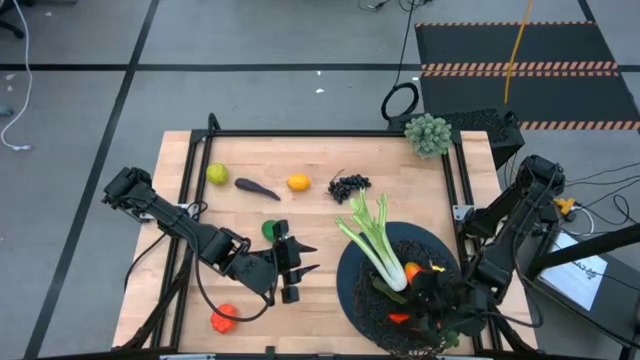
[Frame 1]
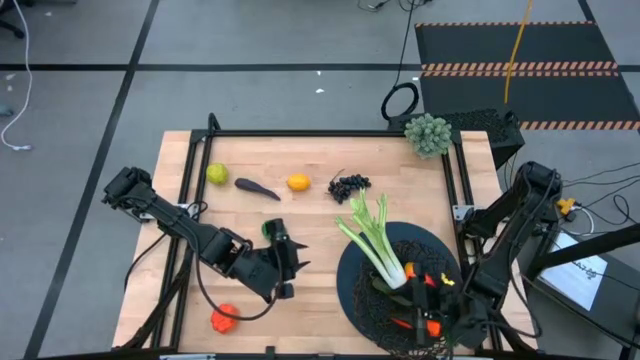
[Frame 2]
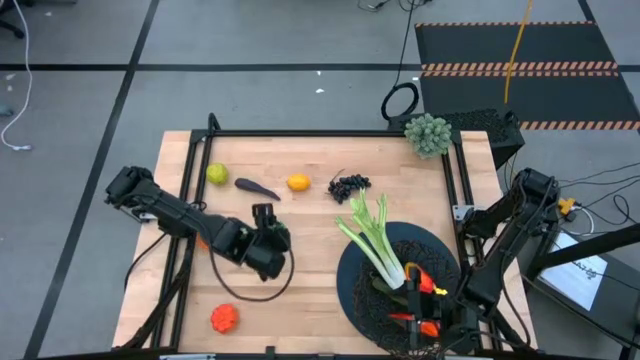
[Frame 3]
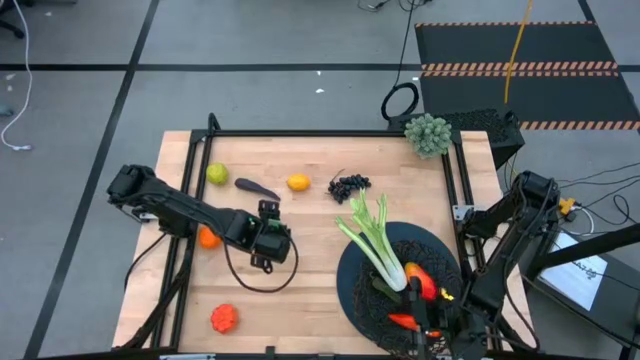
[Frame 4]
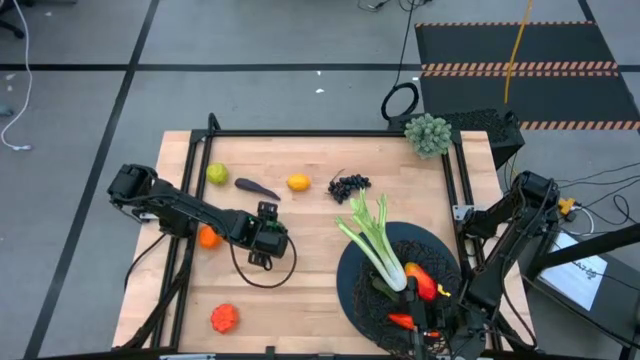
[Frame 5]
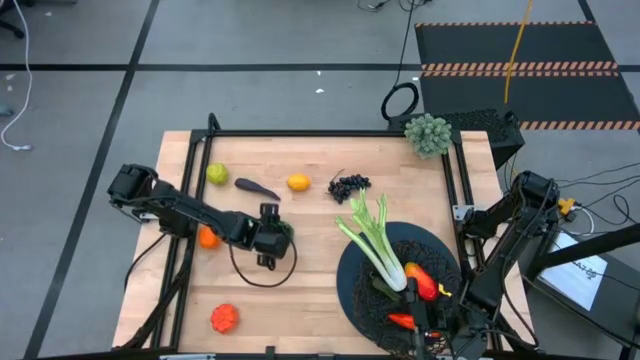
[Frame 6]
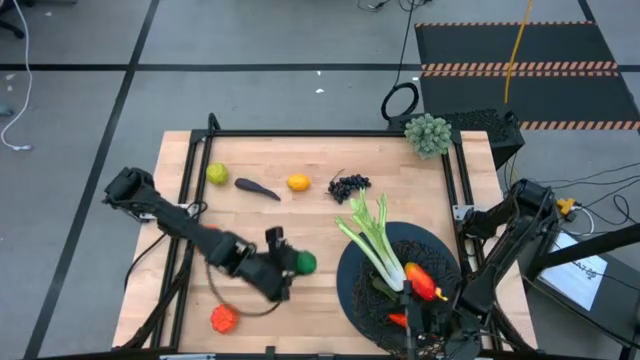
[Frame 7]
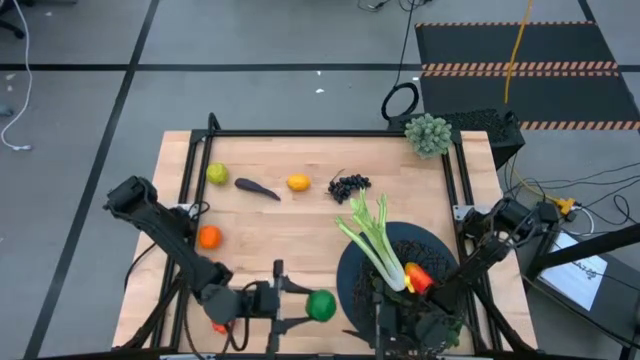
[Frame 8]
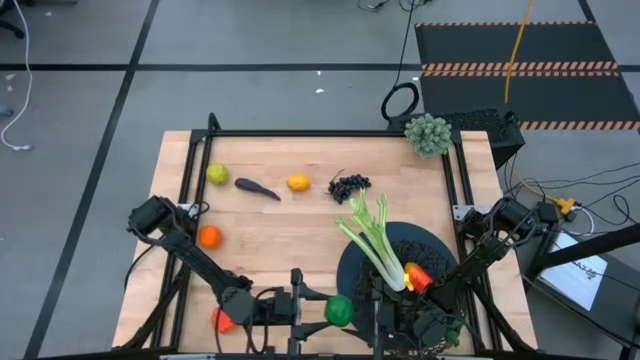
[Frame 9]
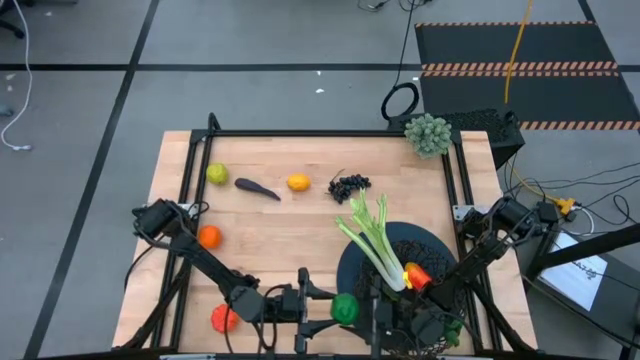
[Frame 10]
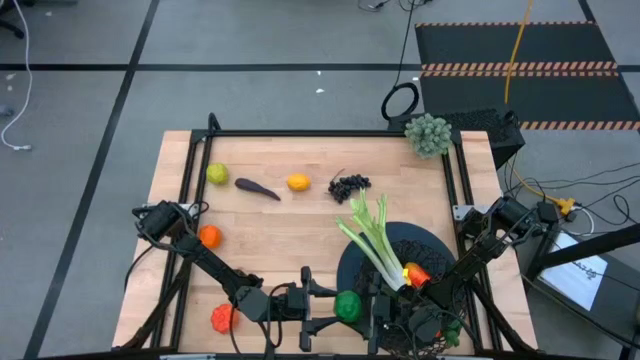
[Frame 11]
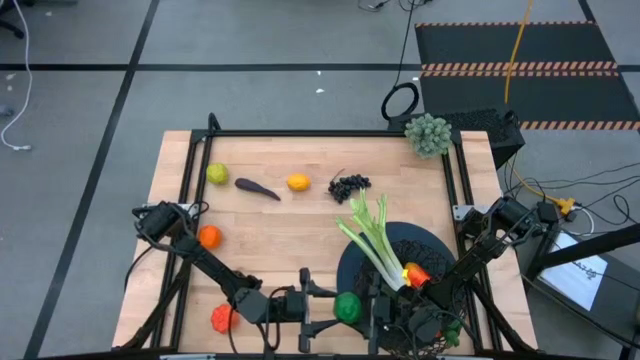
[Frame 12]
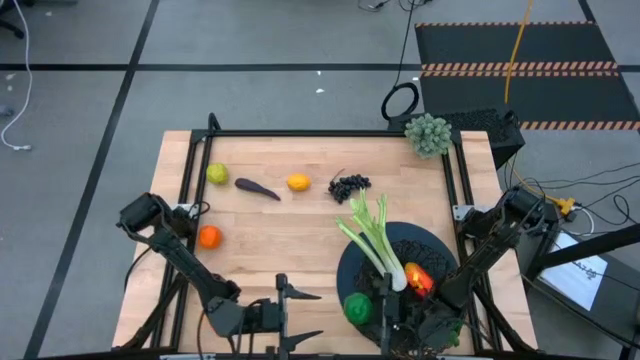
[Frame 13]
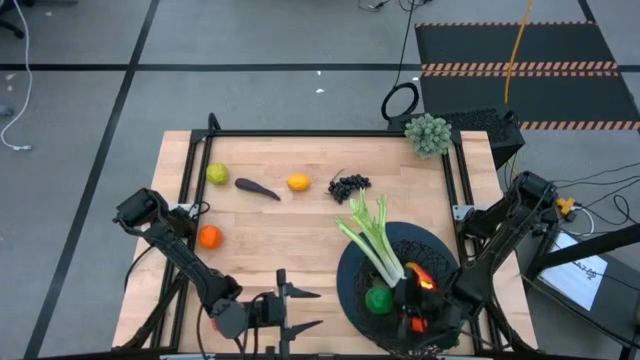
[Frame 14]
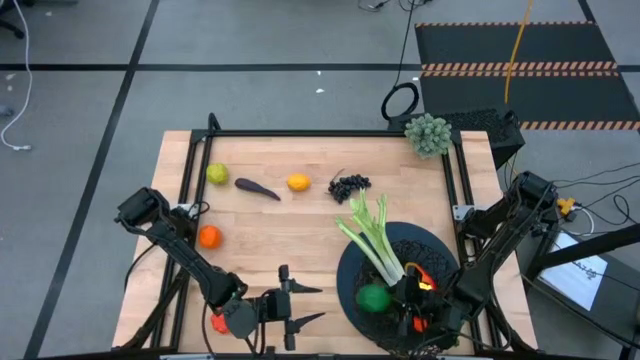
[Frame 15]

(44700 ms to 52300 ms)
Task: Build produce basket
Put the lime into the wire basket

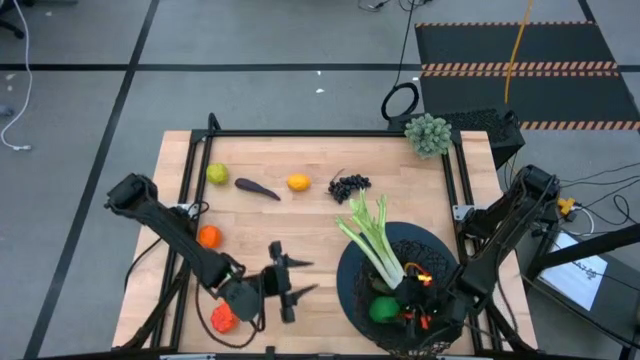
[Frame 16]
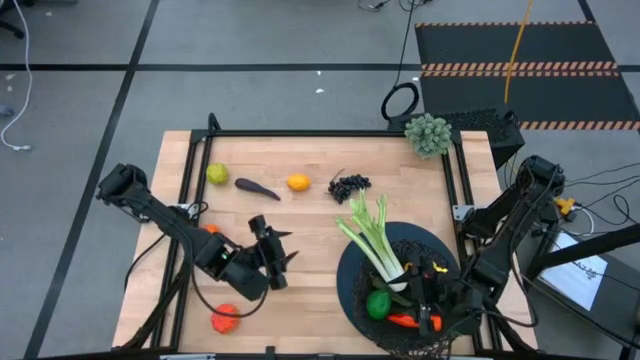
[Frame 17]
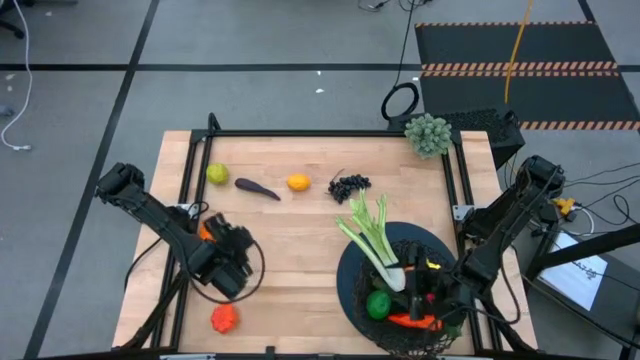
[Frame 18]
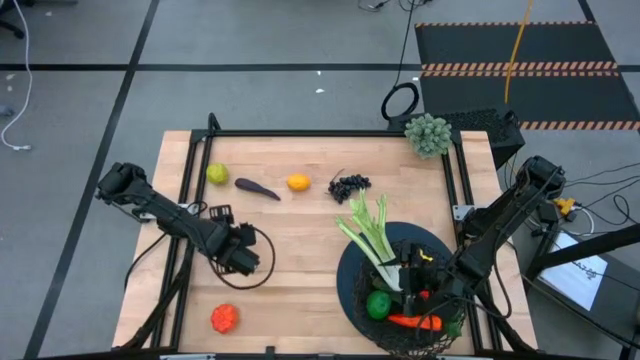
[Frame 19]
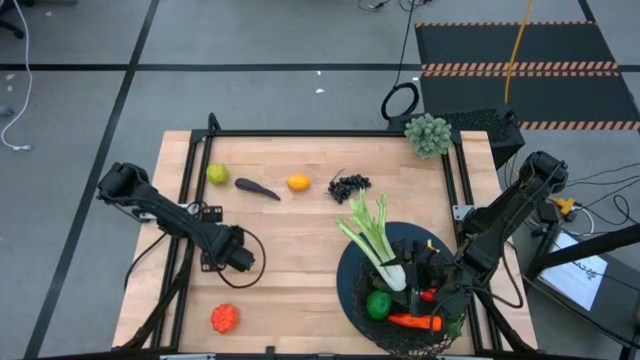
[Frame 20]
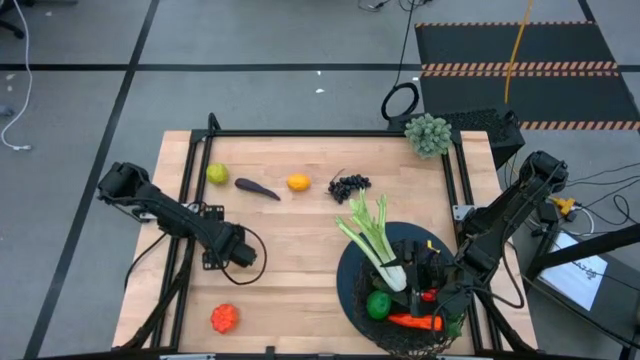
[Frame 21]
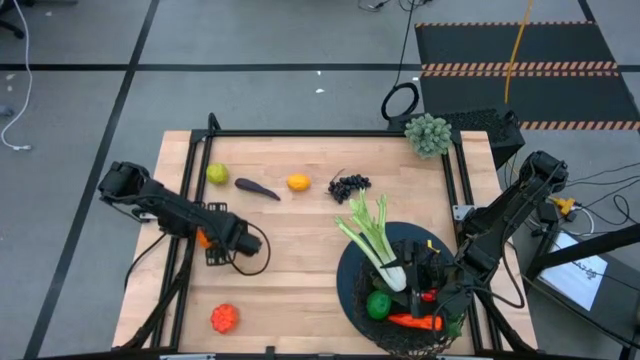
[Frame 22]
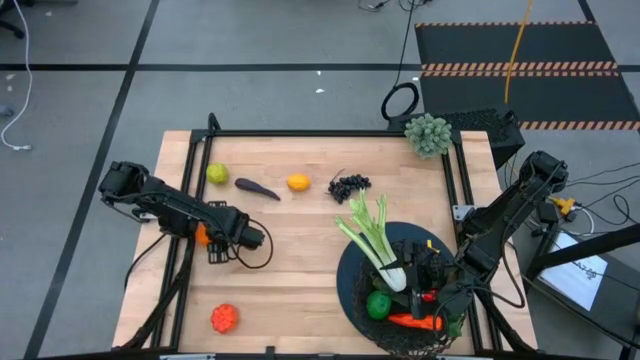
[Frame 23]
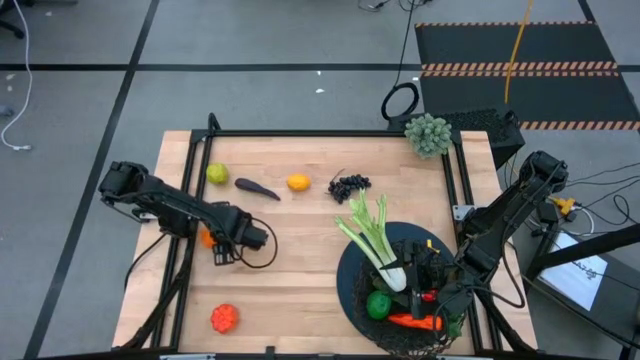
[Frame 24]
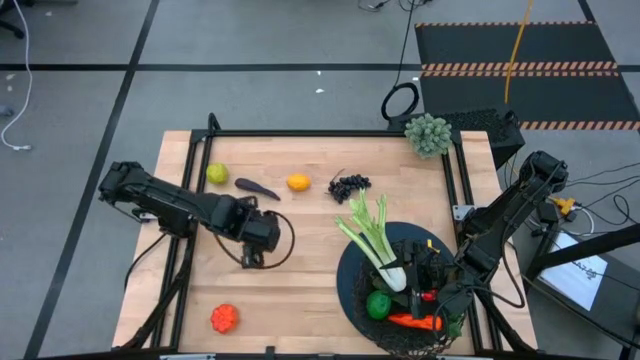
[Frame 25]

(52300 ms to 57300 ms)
Put the orange into the wire basket

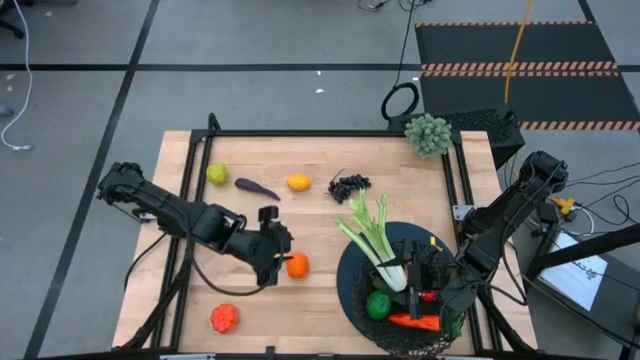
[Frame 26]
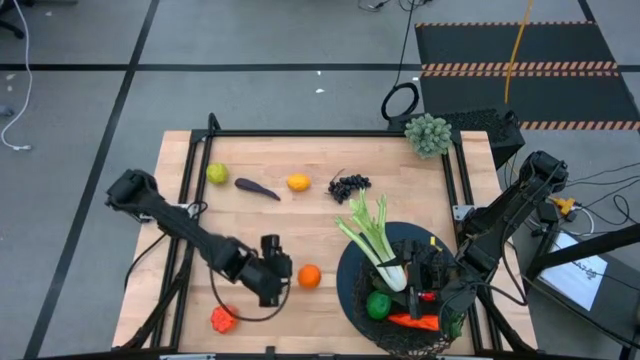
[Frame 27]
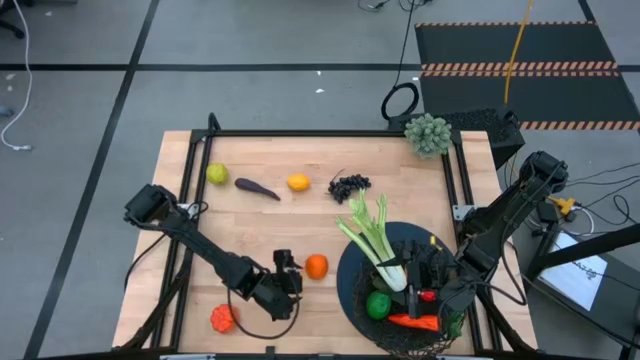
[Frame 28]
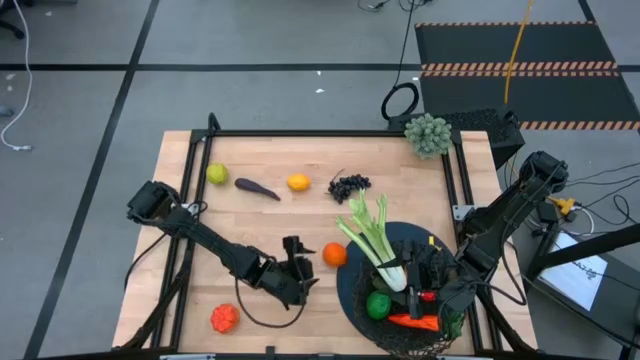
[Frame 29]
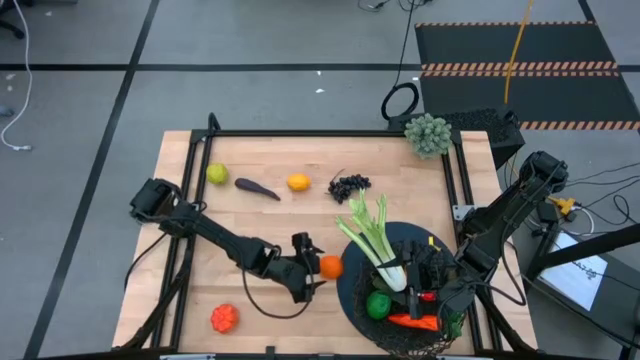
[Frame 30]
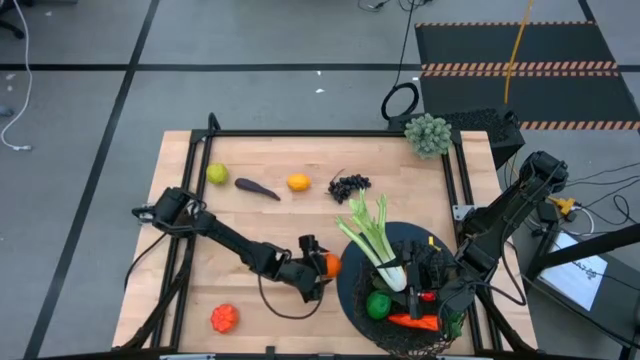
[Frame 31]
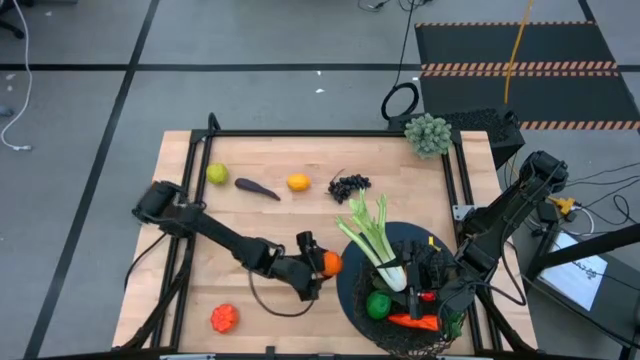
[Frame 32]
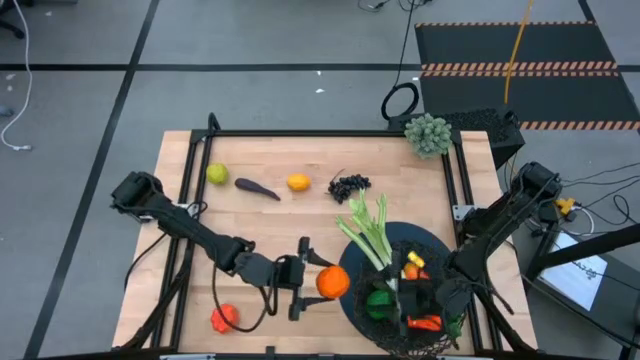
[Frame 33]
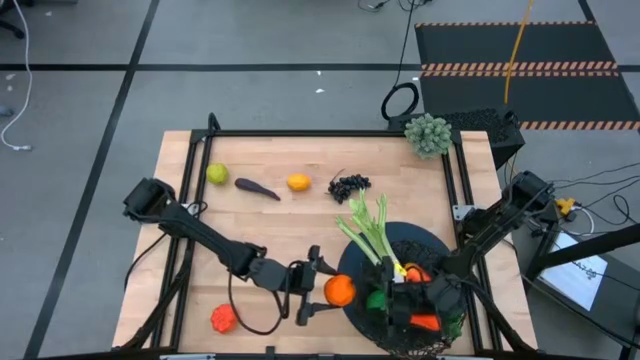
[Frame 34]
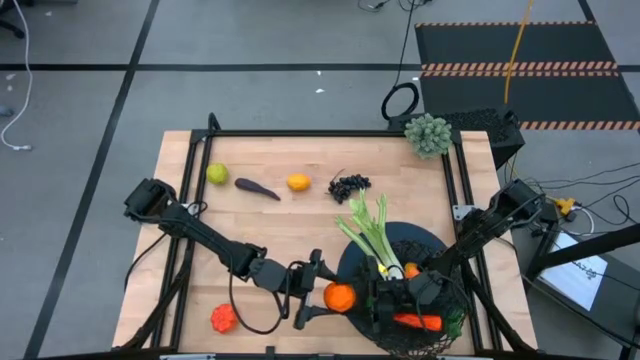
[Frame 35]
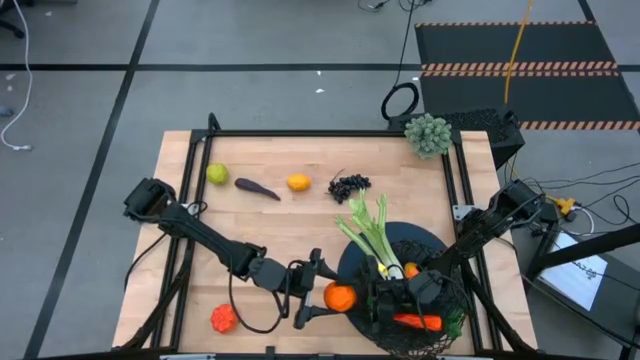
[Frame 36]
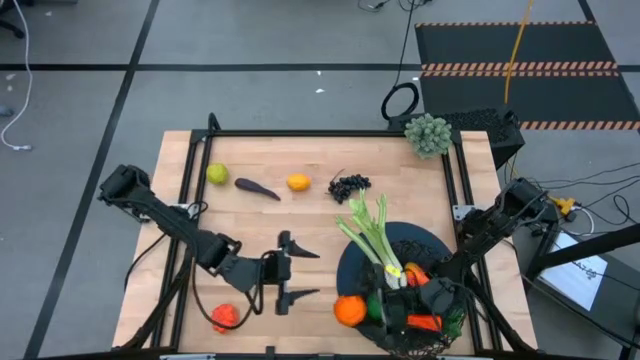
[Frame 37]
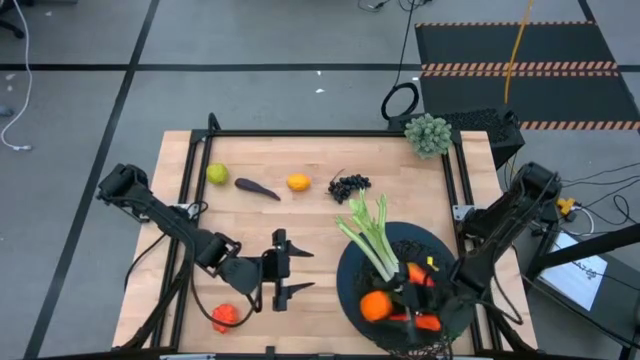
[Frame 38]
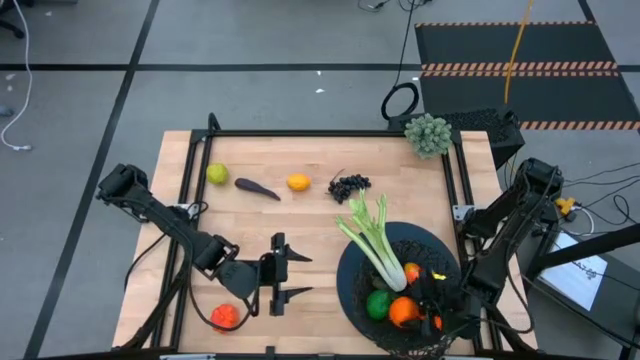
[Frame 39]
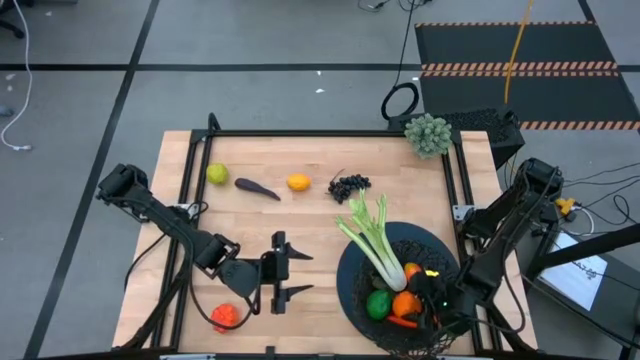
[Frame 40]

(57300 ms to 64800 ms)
Put the orange into the wire basket
